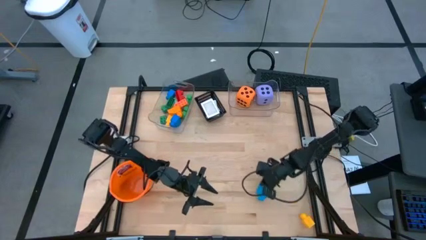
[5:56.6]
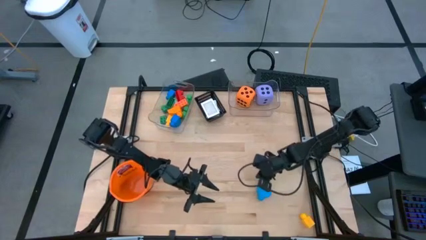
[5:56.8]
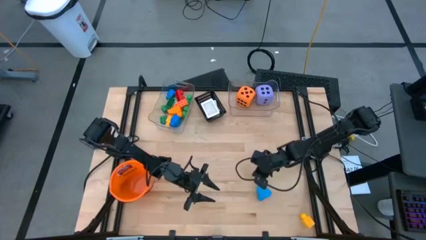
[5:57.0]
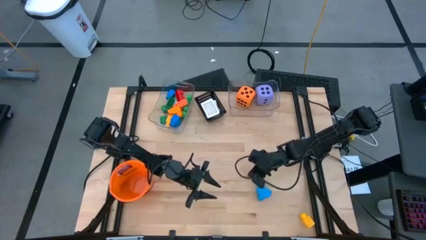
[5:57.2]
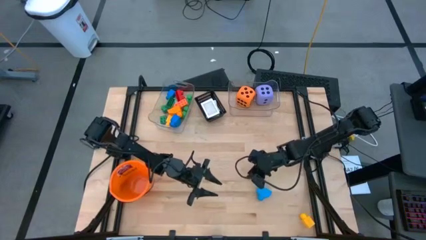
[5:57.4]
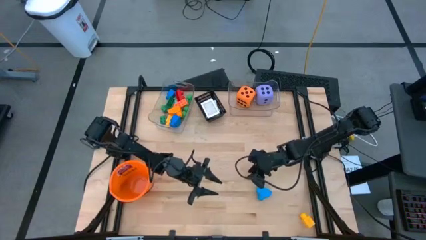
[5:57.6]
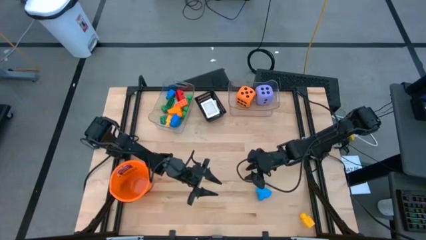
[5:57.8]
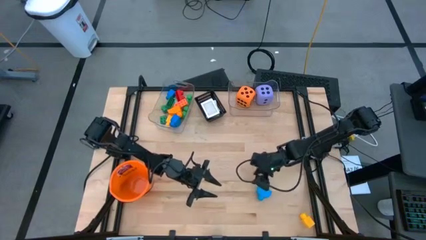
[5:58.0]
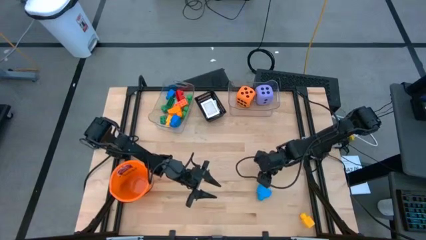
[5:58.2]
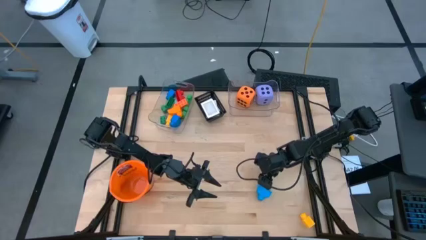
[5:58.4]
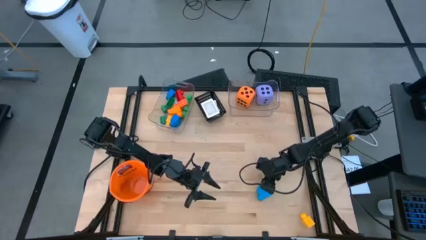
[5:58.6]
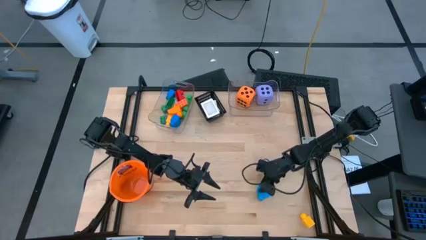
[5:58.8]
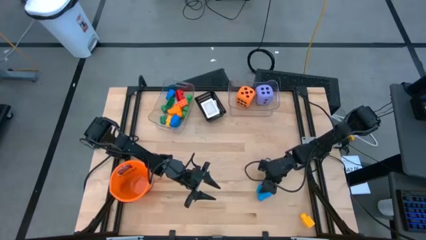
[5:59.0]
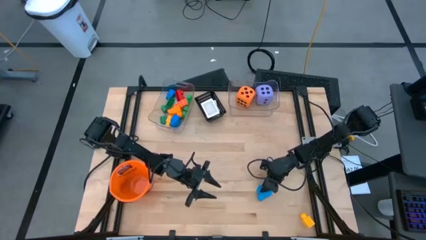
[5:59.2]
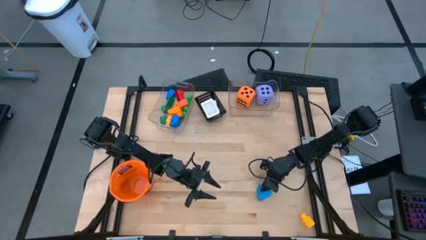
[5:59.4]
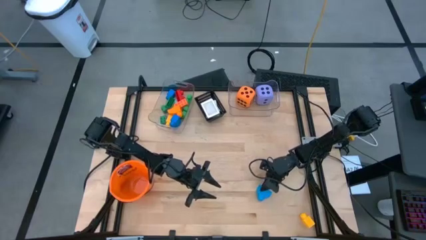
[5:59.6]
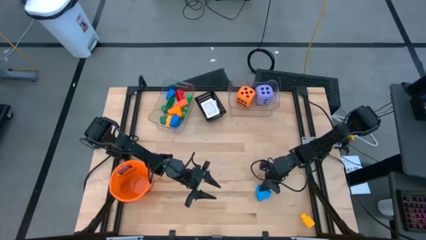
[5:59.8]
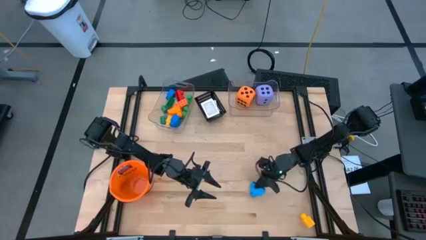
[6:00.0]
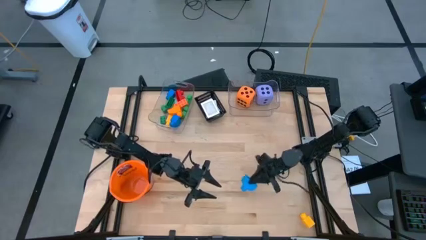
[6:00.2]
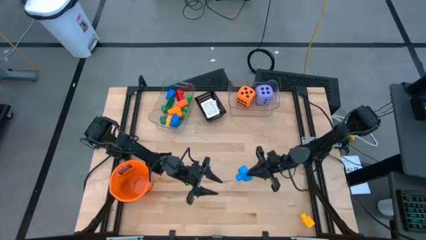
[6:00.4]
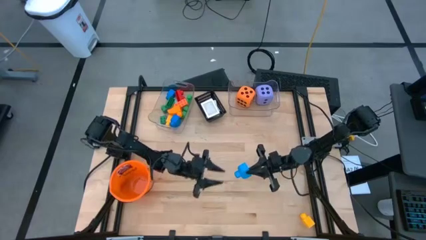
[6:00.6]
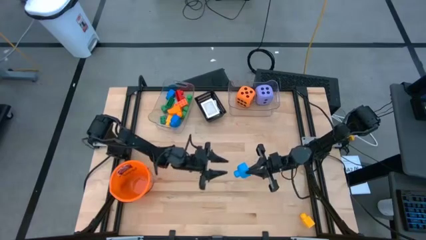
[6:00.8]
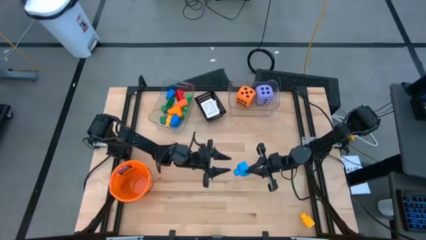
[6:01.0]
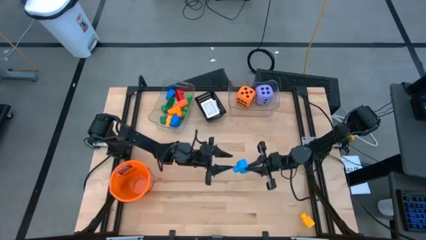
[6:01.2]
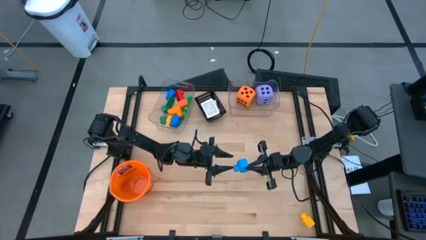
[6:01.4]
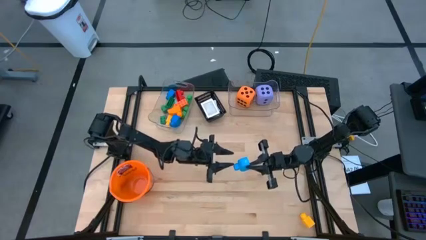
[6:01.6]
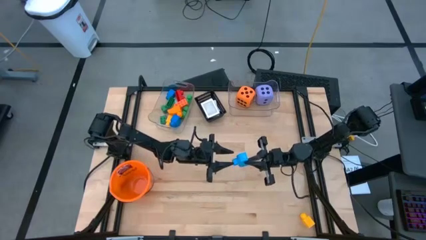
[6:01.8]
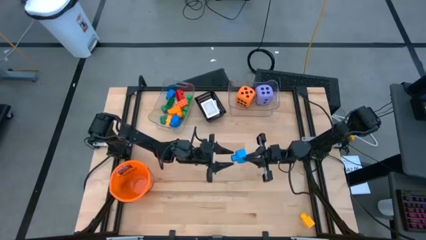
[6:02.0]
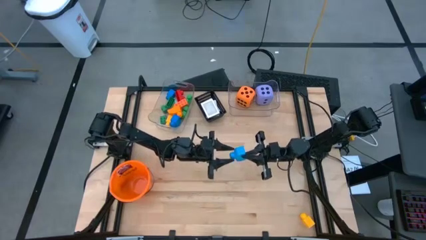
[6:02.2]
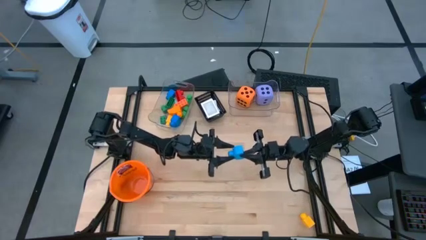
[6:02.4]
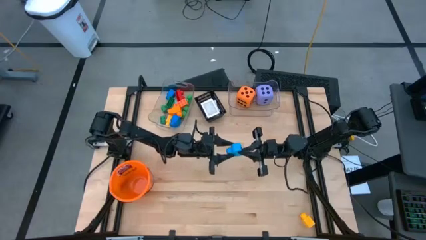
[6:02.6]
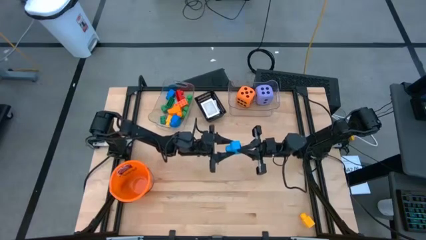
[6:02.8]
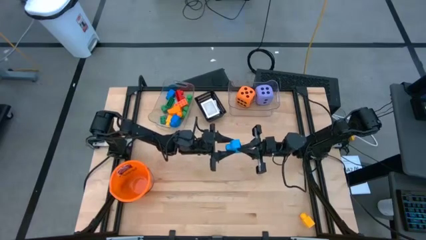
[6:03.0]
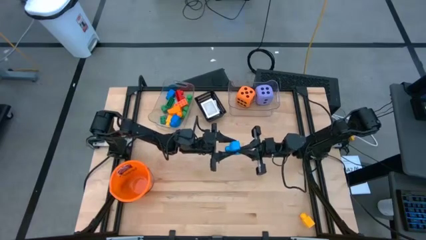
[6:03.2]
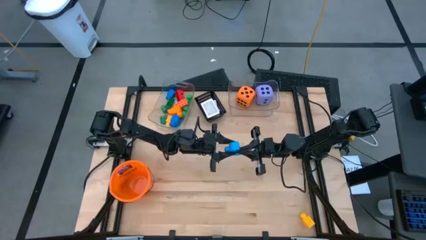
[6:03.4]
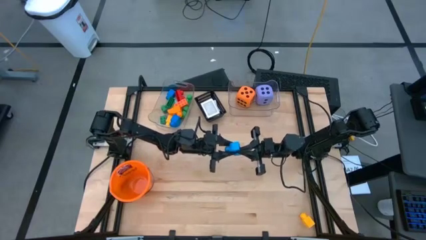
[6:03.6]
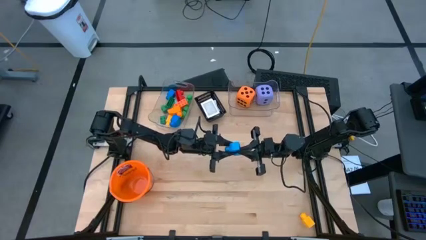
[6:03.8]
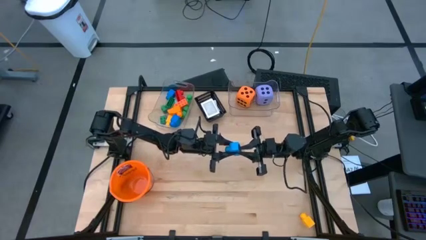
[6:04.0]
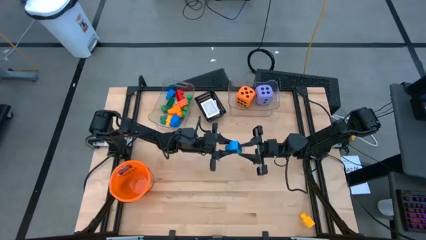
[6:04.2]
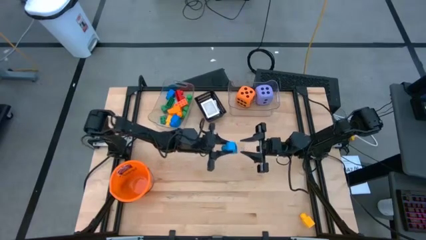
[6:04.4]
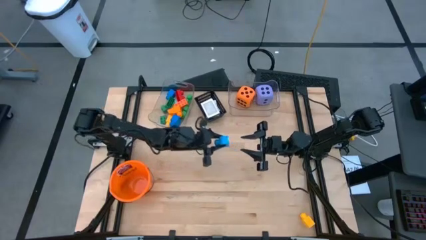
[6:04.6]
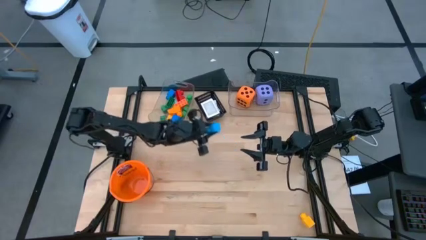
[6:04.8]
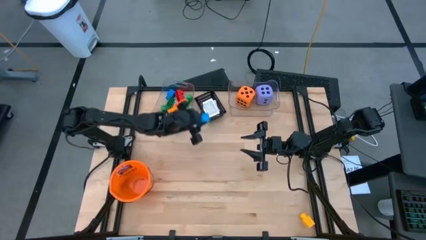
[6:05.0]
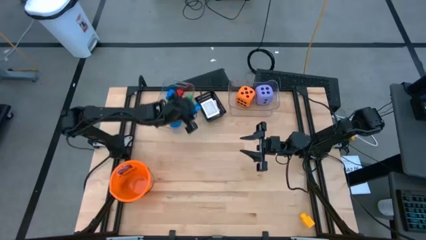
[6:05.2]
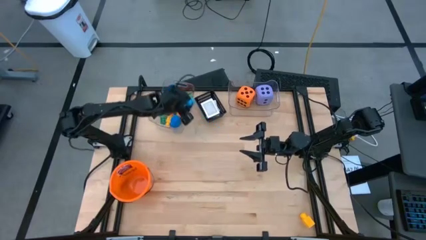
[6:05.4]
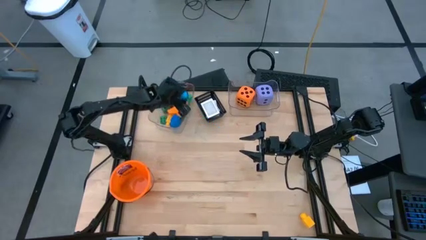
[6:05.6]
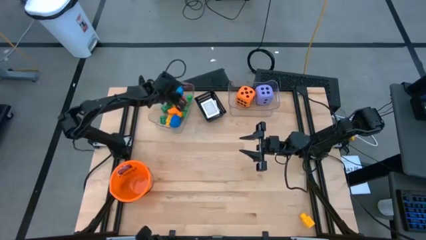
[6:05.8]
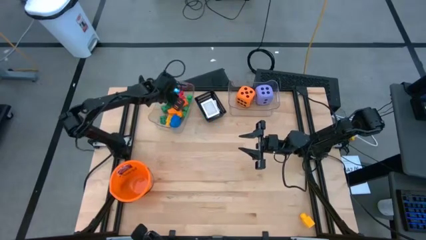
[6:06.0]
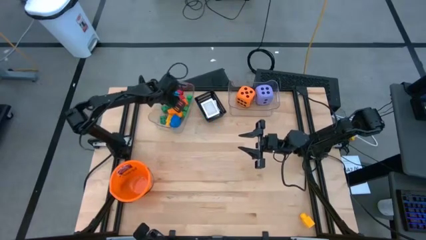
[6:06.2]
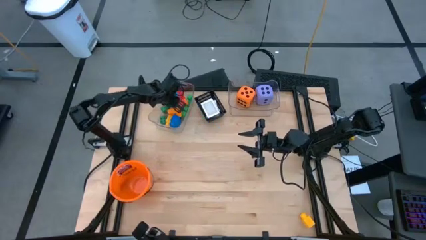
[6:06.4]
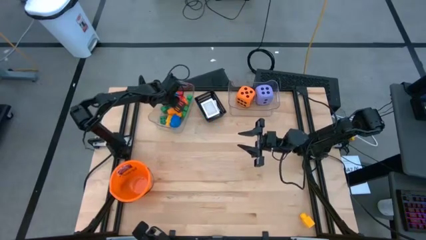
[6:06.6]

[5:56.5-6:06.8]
Task: Pick & Place Toys
Put the blue gamepiece into the left transparent bin
